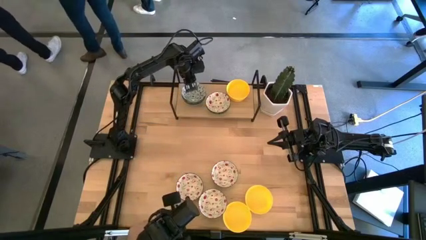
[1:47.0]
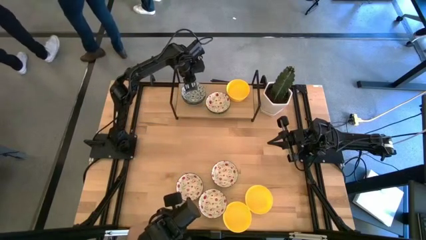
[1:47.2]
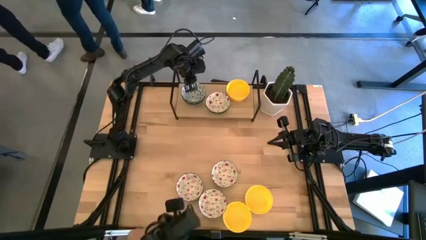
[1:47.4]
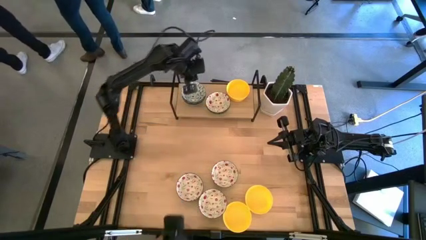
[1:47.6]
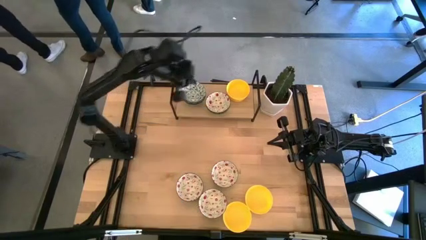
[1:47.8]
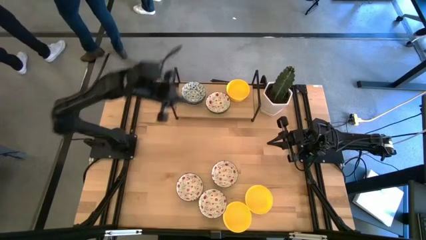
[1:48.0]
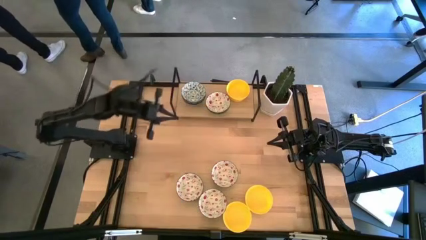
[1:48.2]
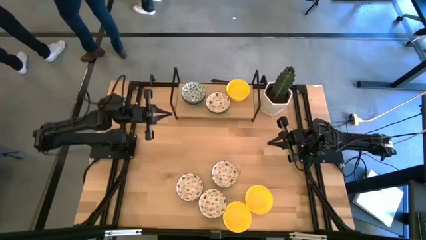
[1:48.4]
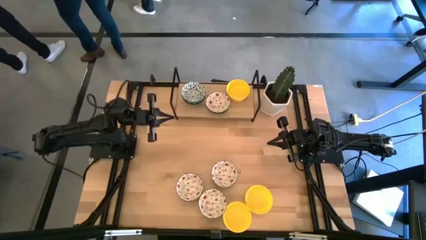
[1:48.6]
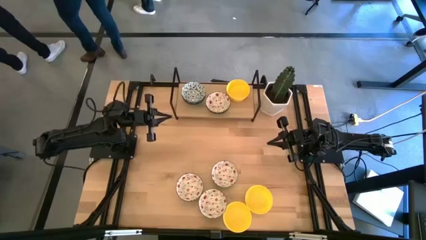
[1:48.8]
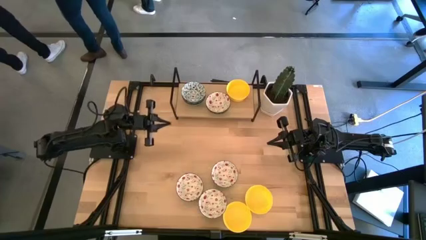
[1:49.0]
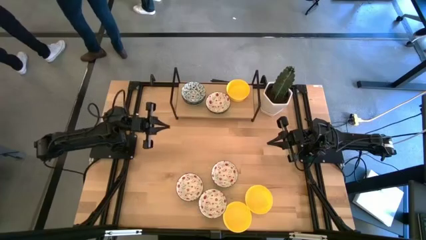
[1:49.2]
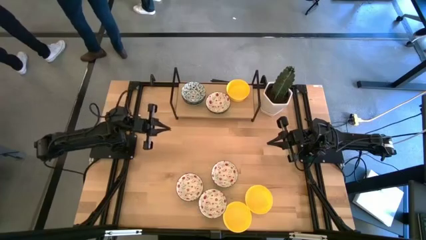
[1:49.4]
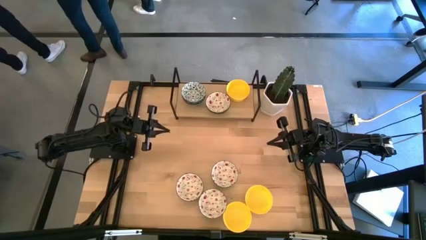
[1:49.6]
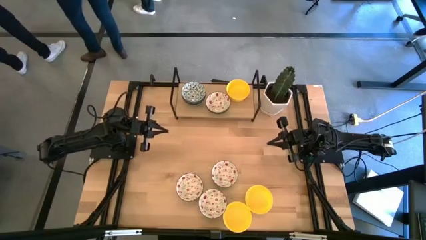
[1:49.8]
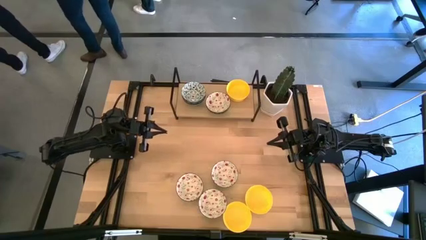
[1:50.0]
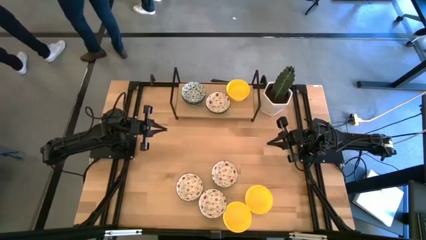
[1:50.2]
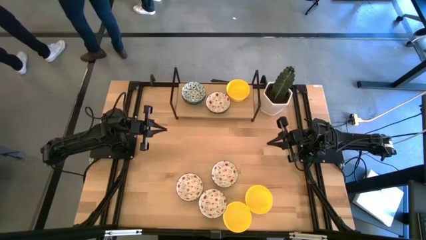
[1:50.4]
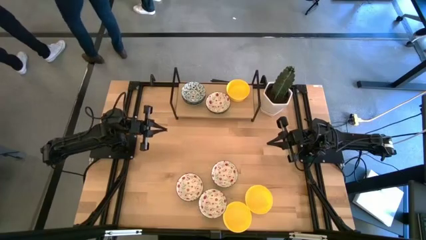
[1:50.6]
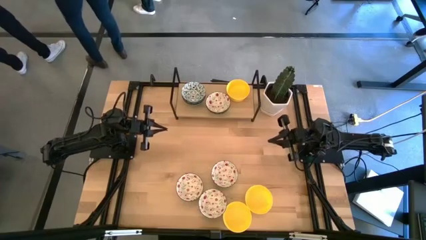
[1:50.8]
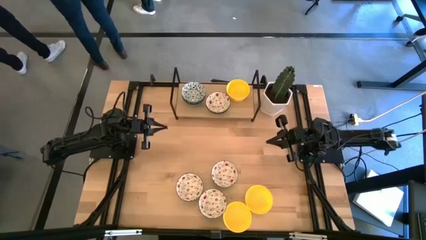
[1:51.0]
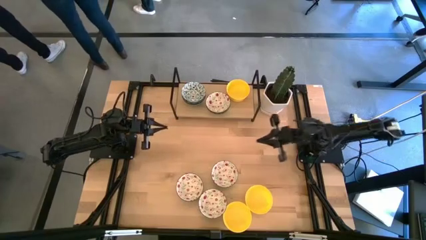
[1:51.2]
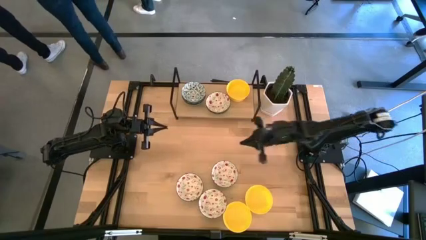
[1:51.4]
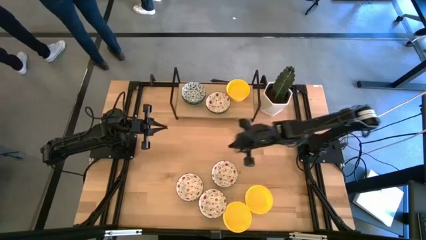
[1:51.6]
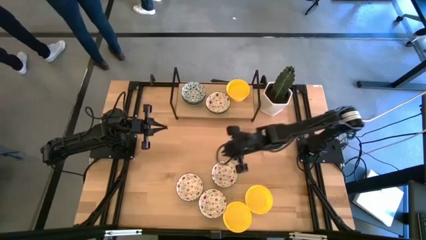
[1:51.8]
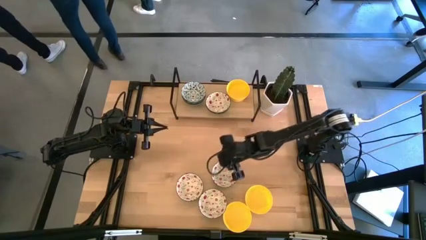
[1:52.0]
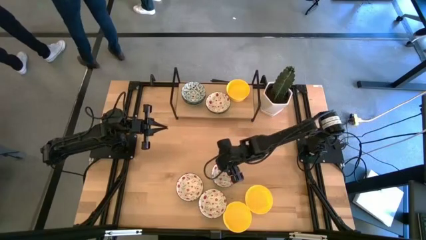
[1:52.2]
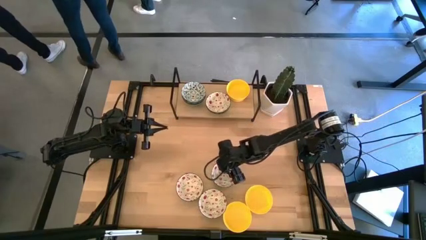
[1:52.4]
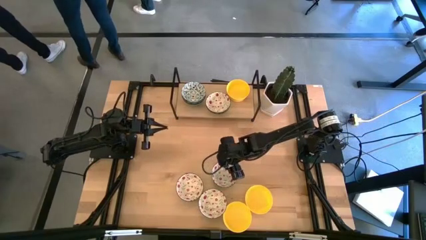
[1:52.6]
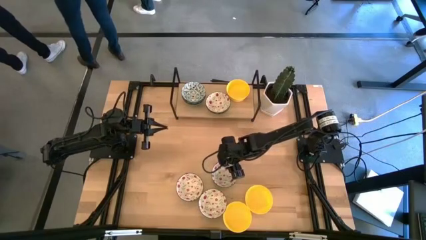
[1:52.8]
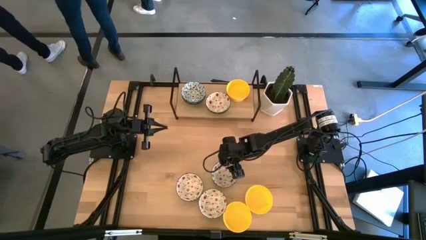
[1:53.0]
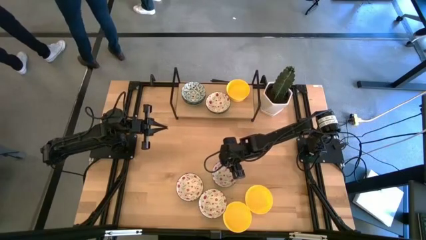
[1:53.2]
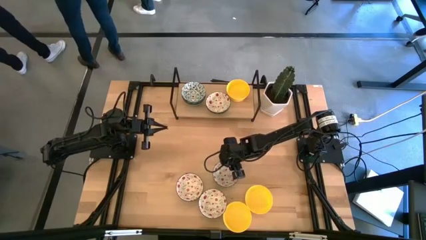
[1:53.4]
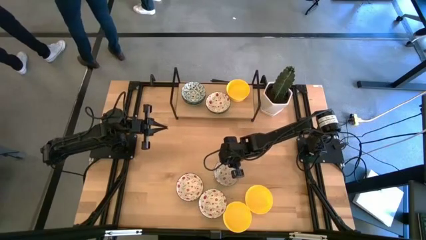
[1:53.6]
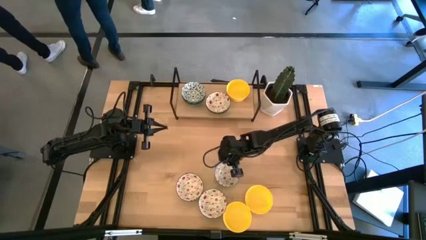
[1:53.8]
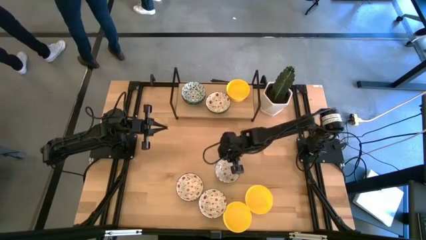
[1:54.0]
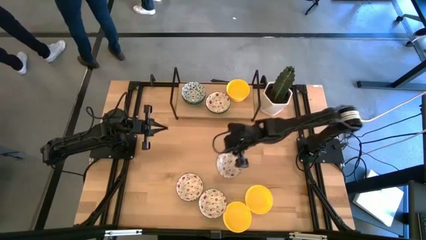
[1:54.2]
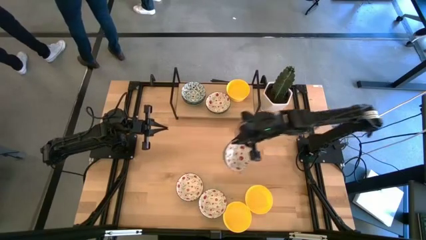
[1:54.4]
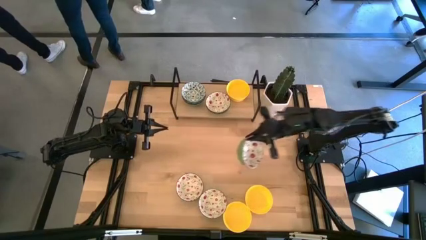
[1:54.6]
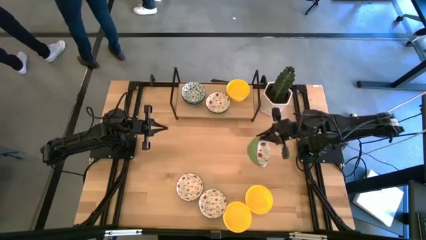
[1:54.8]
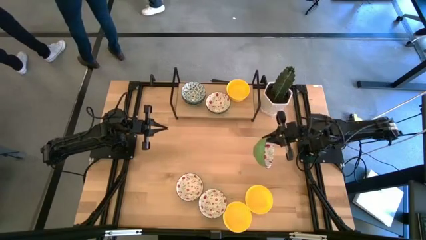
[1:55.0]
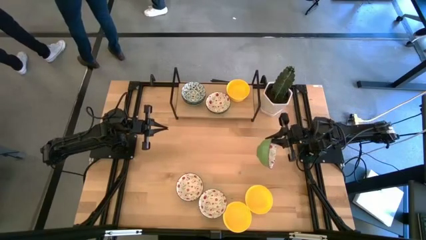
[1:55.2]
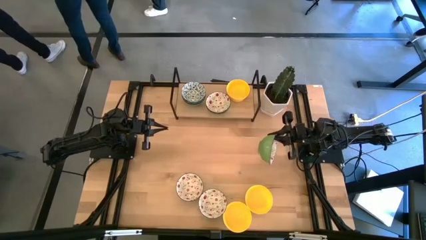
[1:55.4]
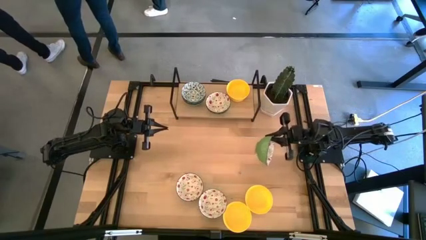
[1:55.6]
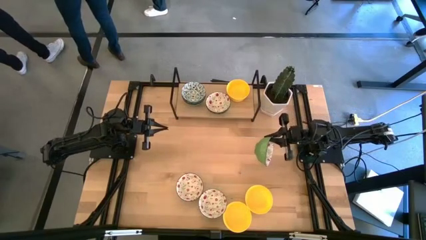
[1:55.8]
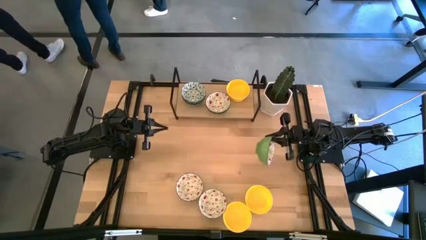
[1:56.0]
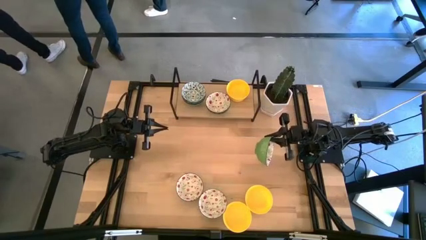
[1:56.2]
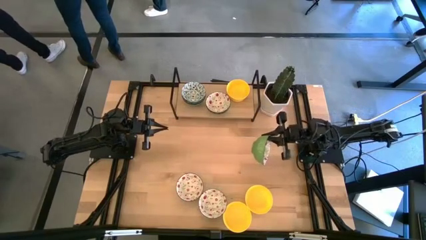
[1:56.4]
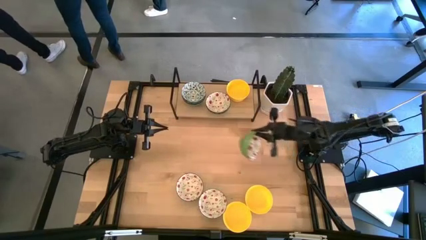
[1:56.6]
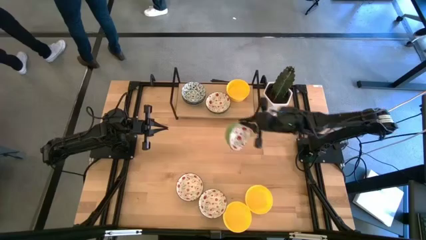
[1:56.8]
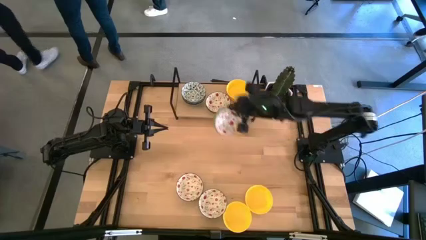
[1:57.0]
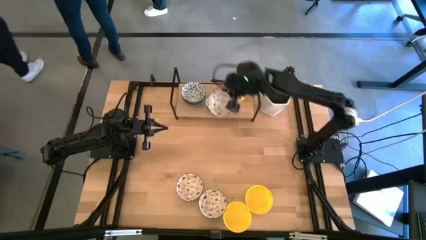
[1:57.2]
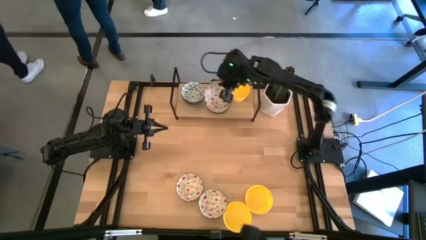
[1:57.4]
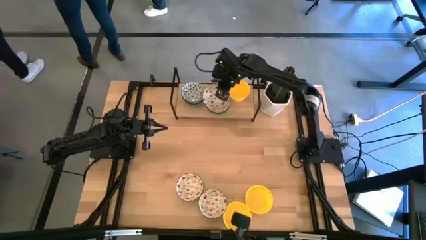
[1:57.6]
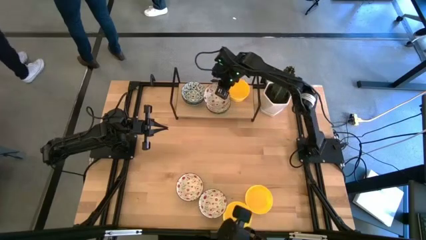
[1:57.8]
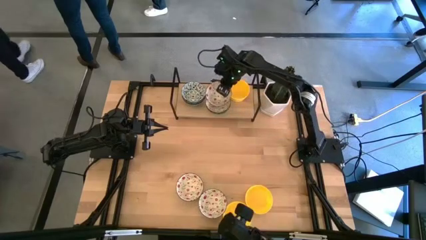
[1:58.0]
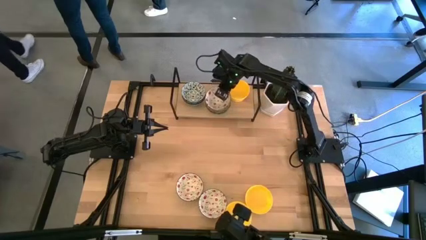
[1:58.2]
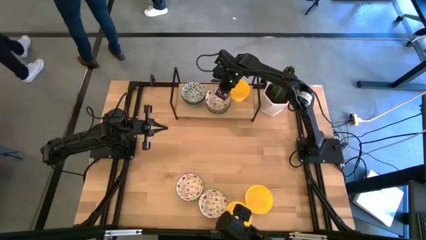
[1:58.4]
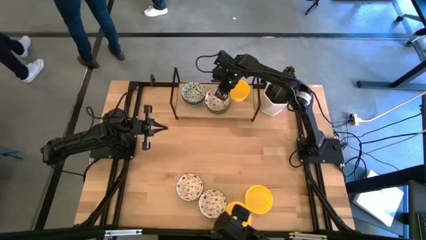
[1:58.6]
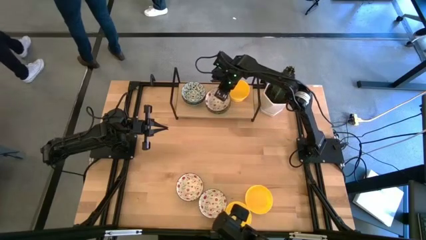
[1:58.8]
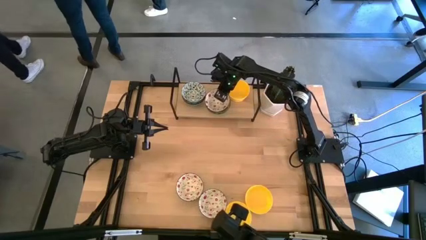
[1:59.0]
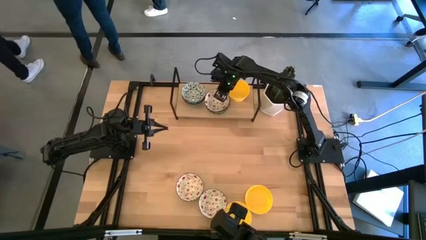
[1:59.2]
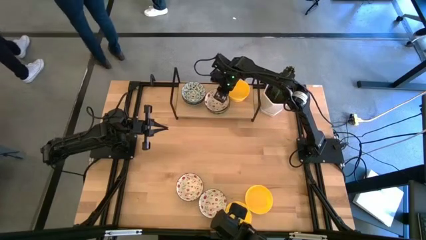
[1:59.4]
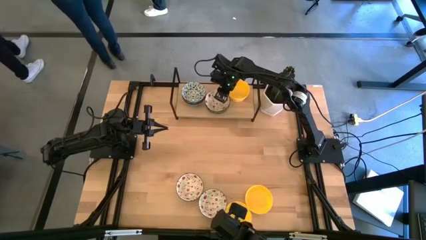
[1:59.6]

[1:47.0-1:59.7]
Task: Pick & Place Mini bowls
Stack the red patterned bowl on the red patterned bowl

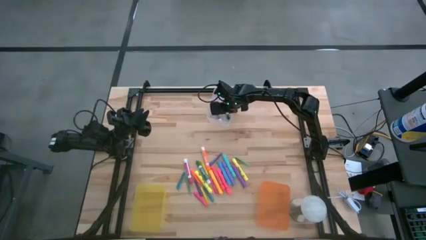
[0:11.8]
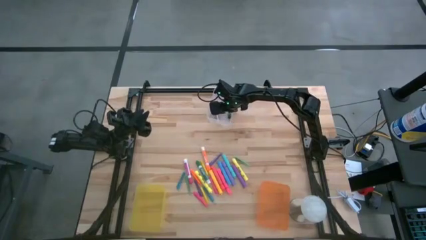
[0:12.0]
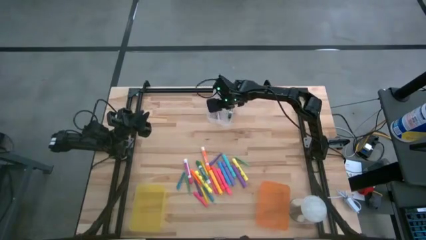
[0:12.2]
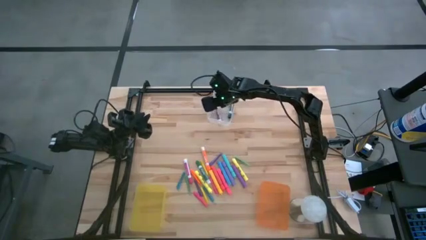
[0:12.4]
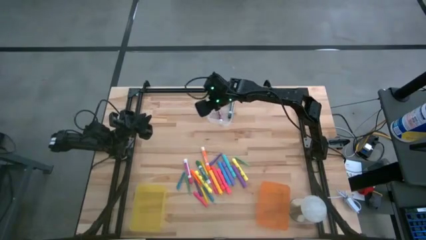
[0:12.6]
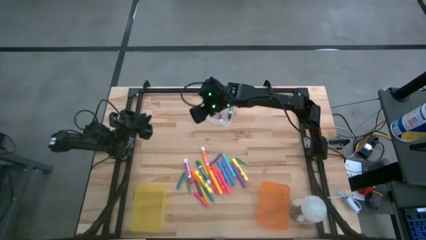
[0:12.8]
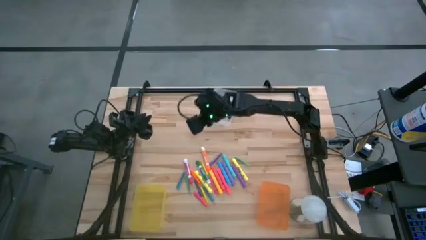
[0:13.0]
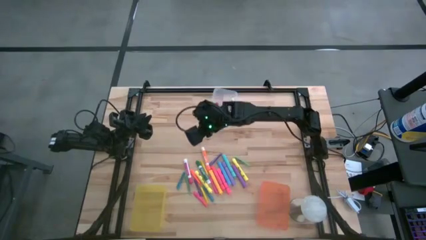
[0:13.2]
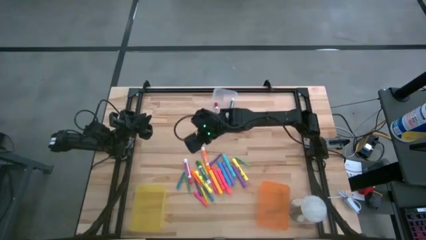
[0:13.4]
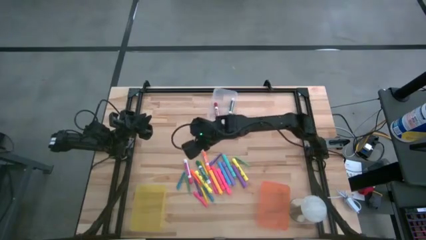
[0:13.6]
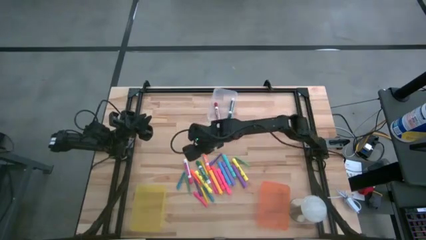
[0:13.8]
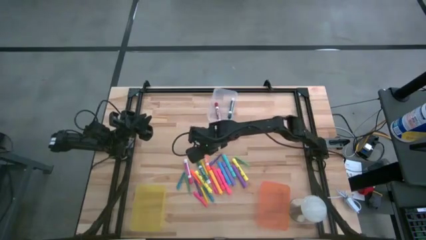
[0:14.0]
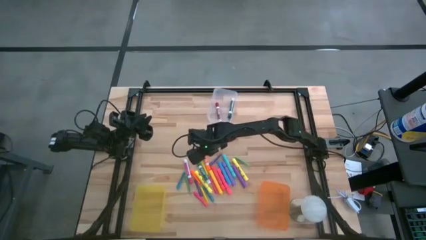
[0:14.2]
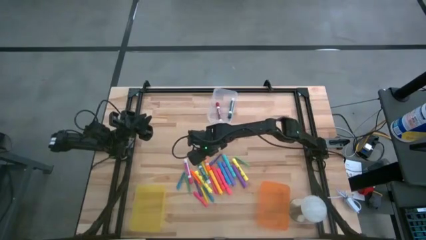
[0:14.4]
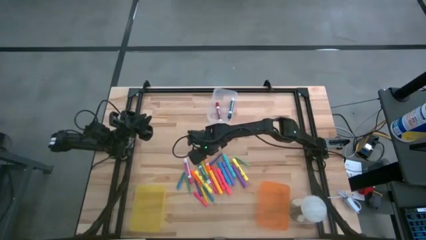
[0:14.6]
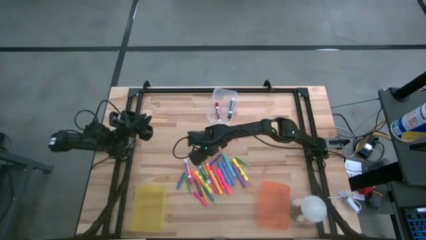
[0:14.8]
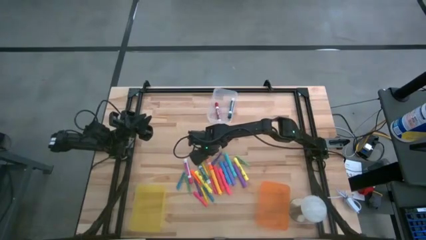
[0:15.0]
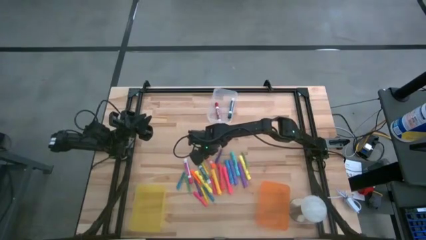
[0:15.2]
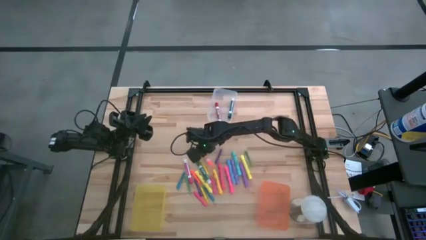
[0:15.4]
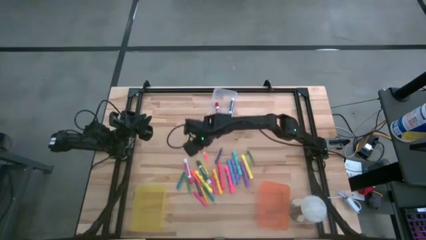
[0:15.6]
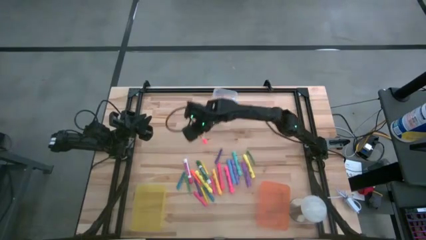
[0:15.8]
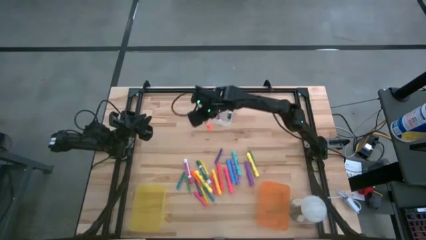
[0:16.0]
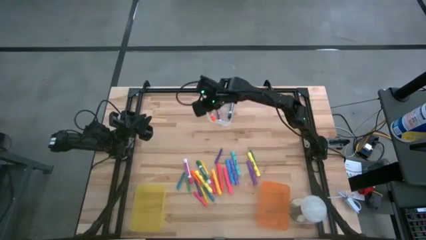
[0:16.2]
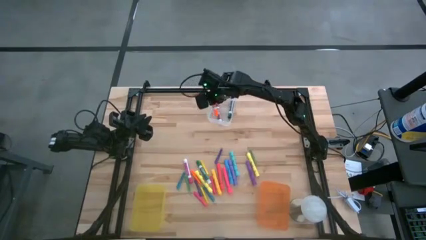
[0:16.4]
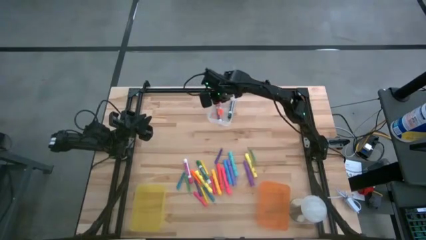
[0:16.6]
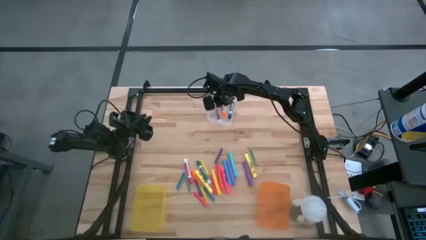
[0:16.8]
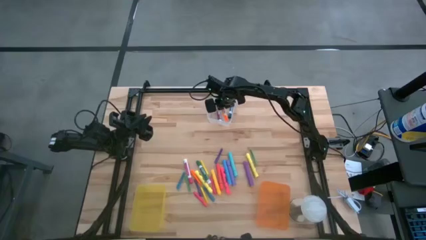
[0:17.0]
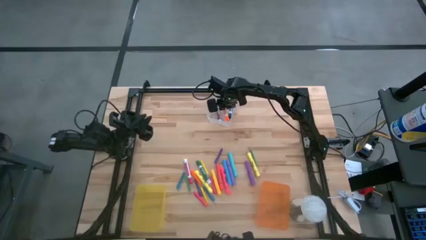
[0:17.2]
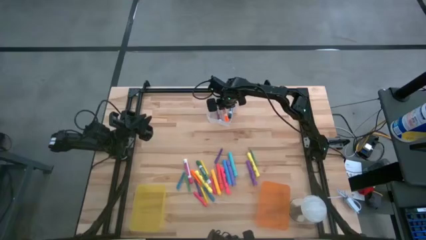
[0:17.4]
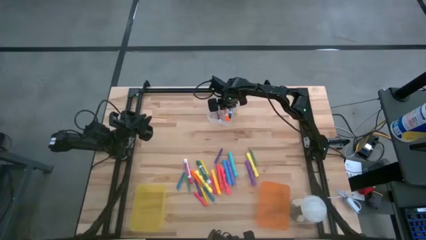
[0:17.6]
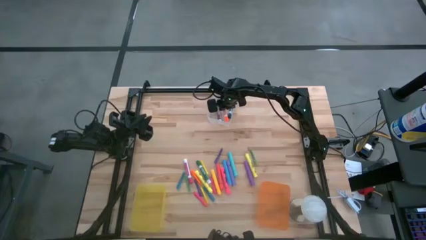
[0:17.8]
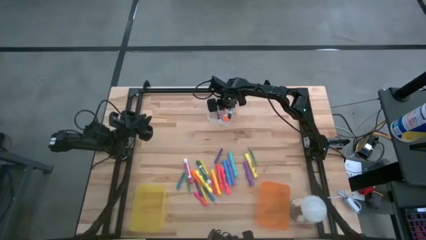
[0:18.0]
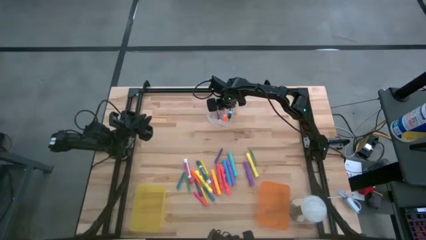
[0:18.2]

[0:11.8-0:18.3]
Task: Pick & Place Markers
Put the orange and white marker pen into the white bin
